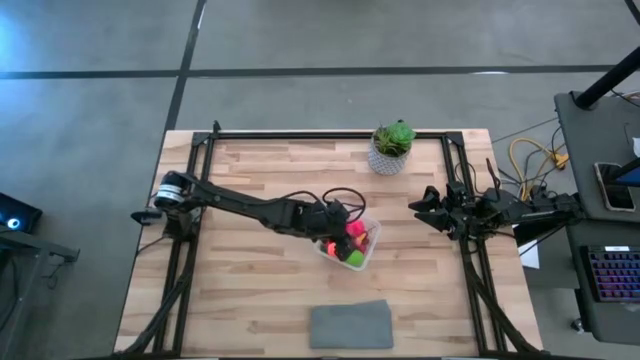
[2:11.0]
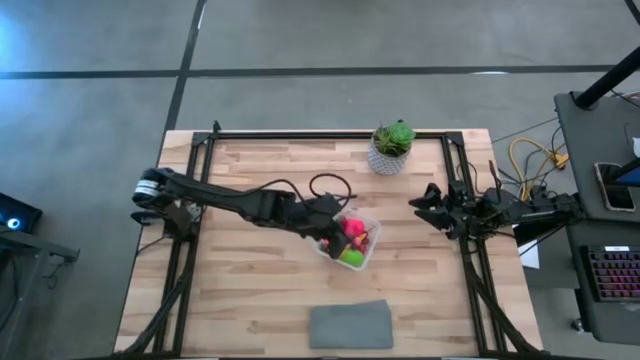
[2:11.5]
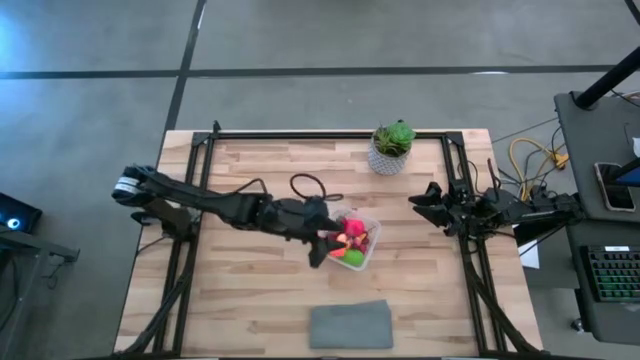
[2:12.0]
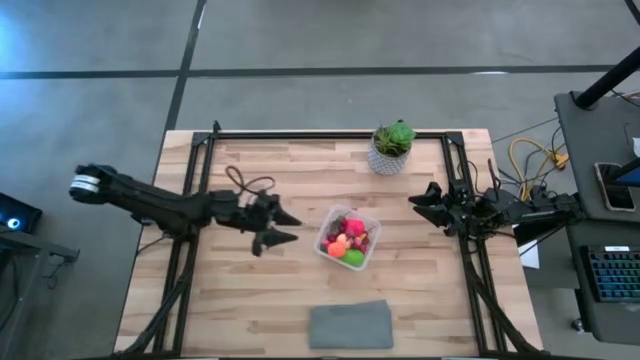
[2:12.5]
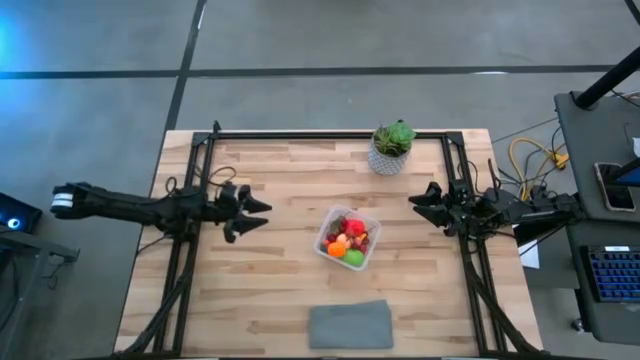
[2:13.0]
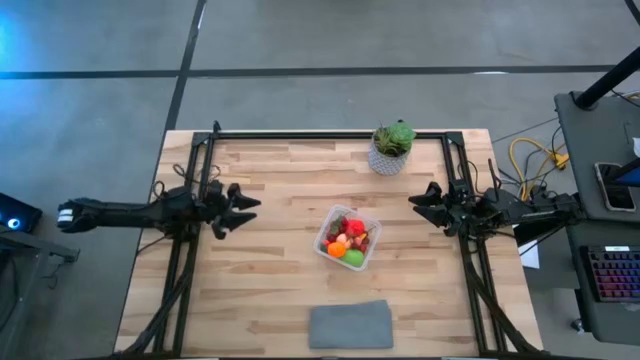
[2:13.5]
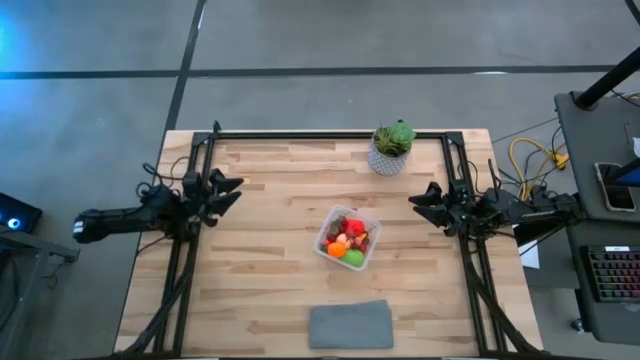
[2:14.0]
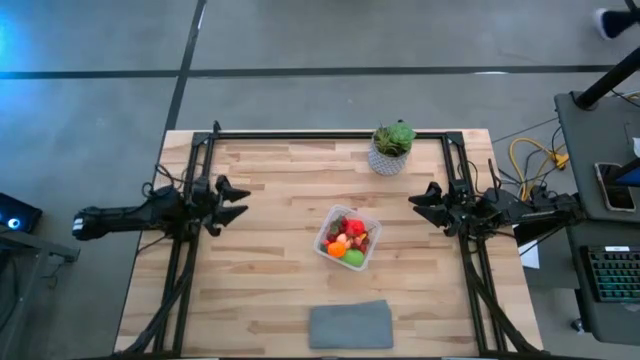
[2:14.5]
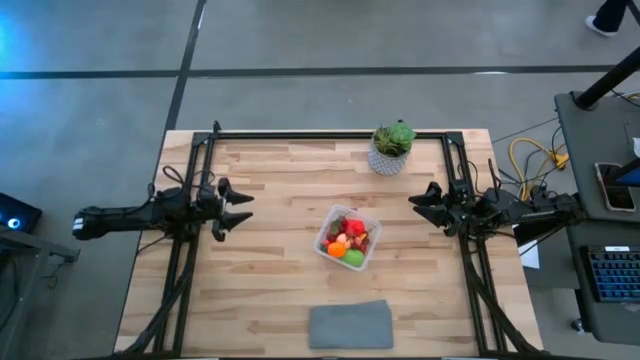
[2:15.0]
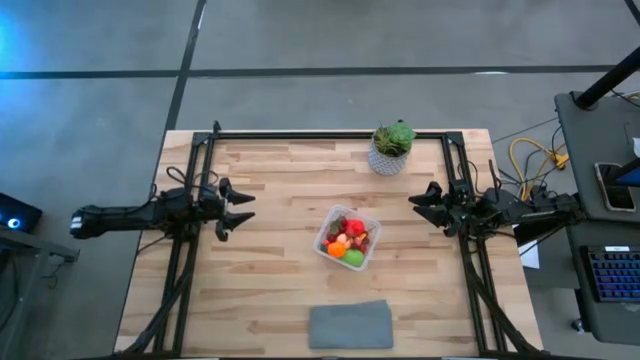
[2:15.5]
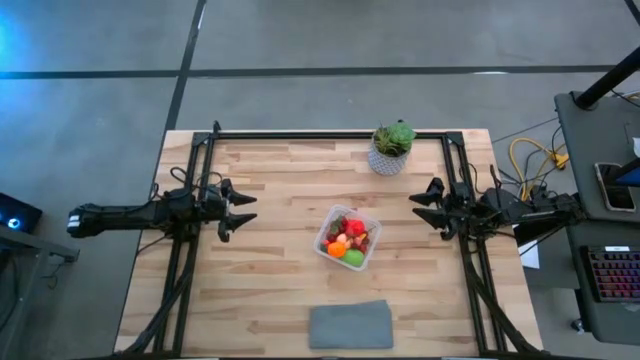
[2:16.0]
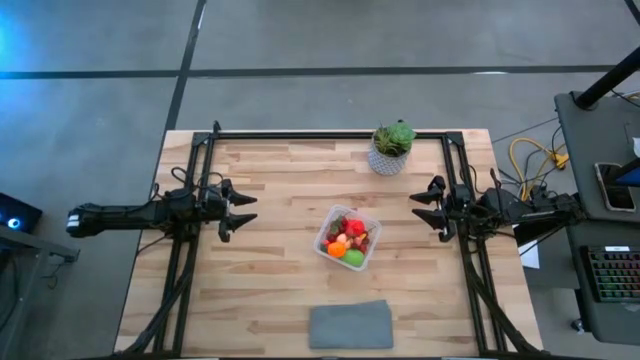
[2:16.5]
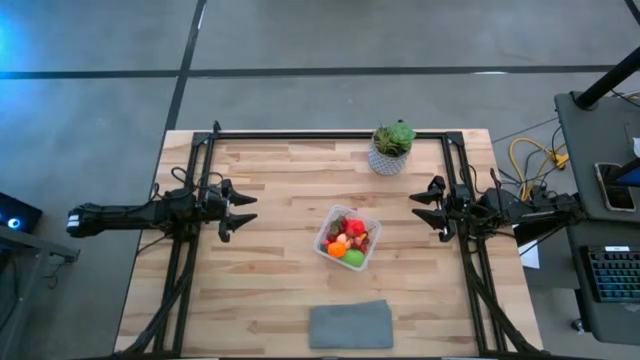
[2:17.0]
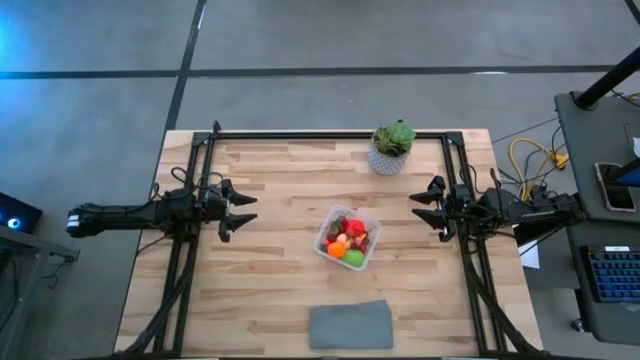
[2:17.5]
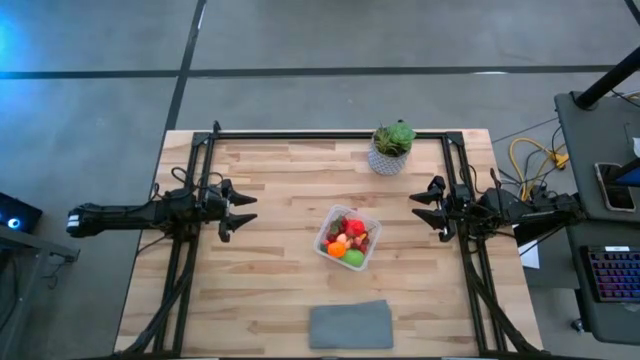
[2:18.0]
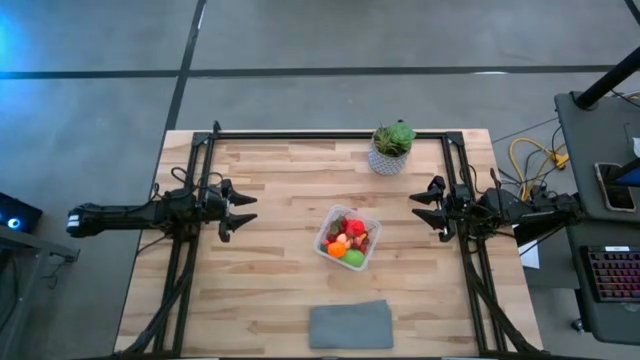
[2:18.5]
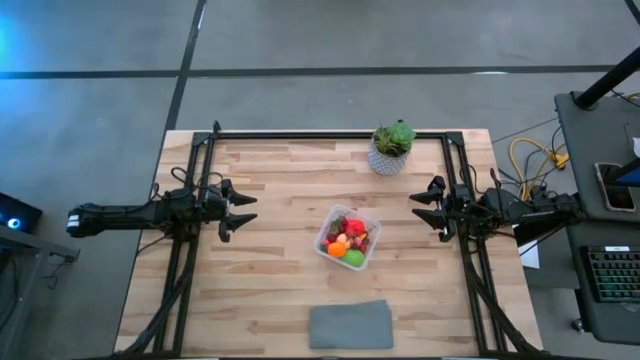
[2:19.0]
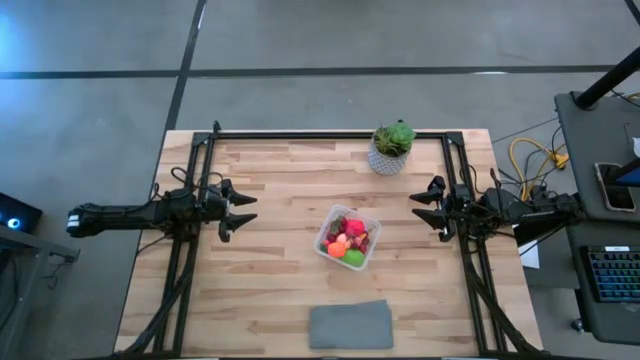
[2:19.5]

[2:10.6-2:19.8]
Task: Pick and placing Produce into tupperware
Return to Home Position

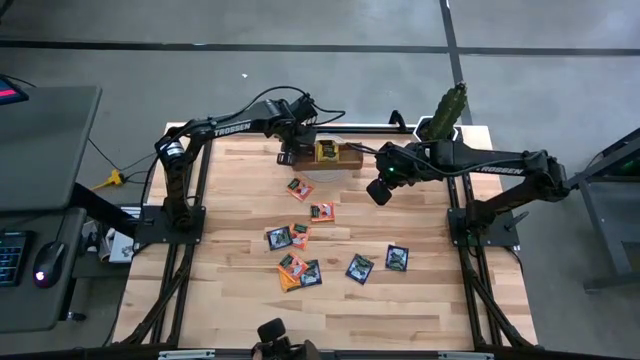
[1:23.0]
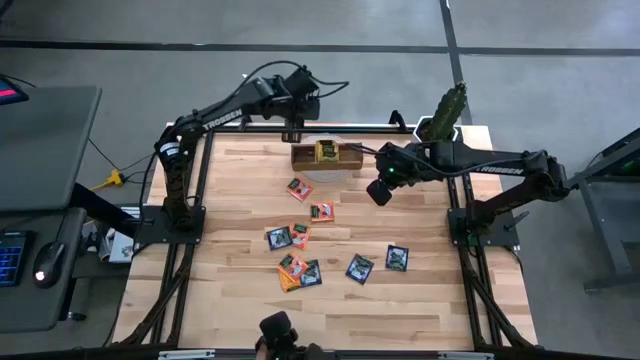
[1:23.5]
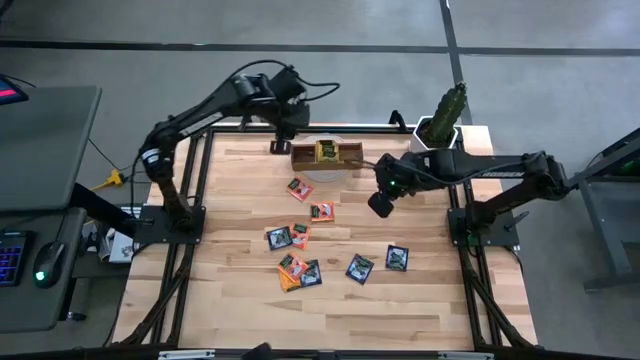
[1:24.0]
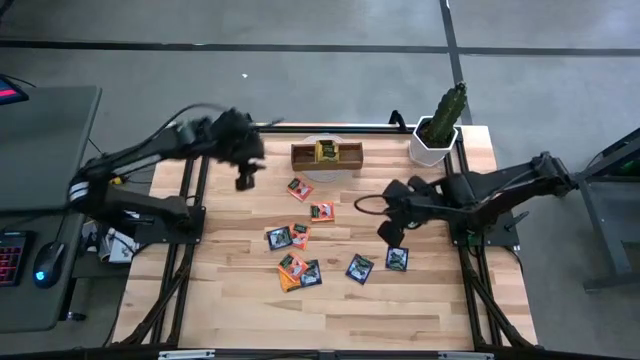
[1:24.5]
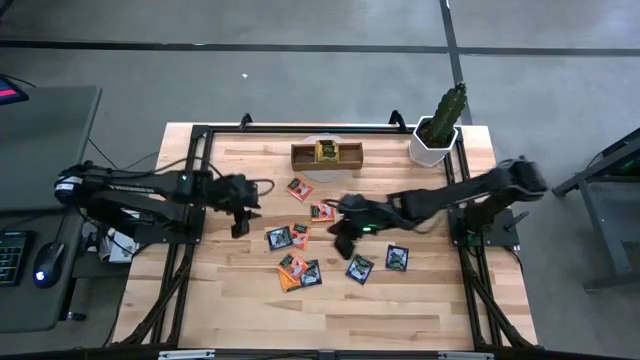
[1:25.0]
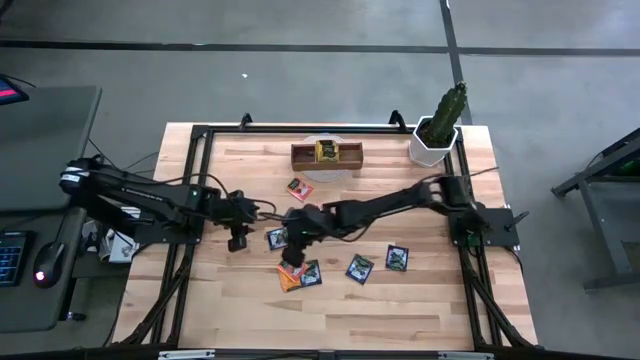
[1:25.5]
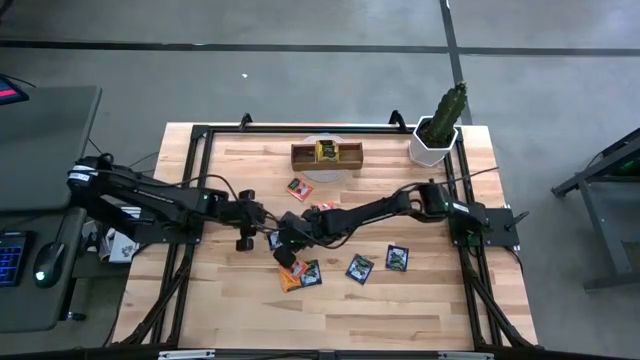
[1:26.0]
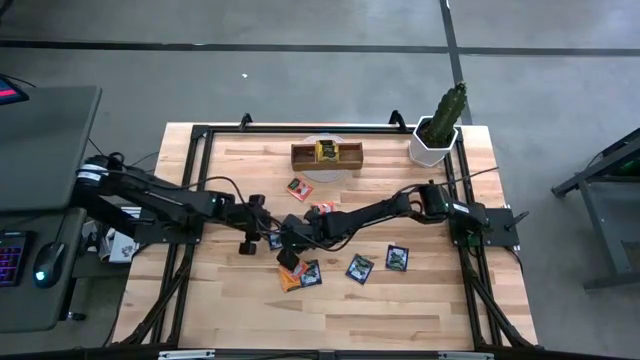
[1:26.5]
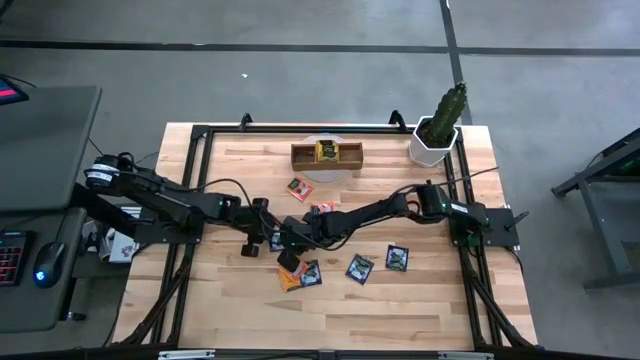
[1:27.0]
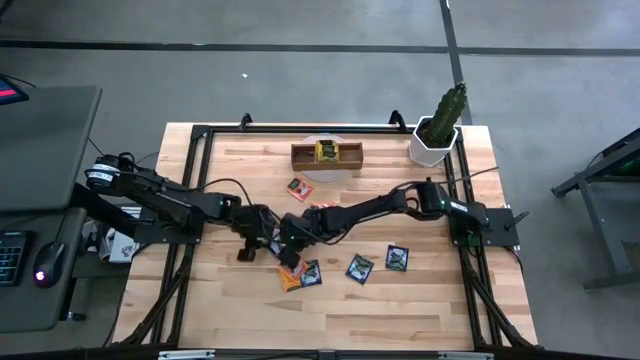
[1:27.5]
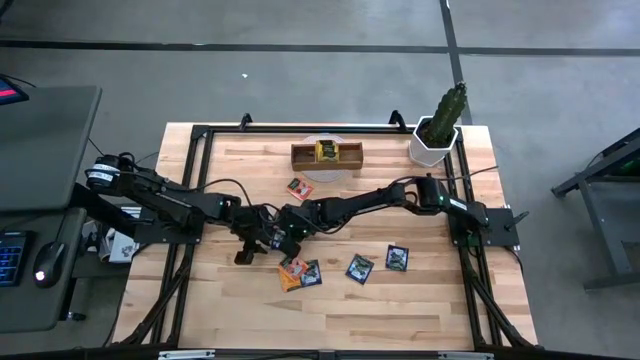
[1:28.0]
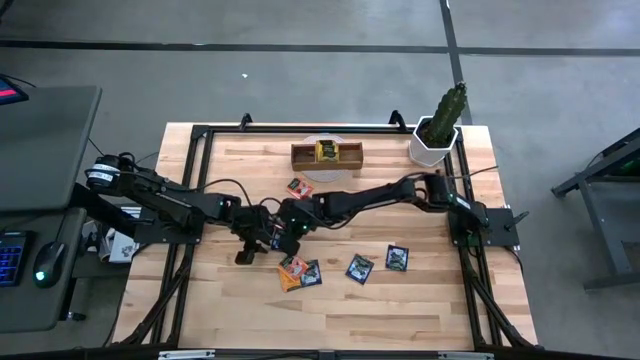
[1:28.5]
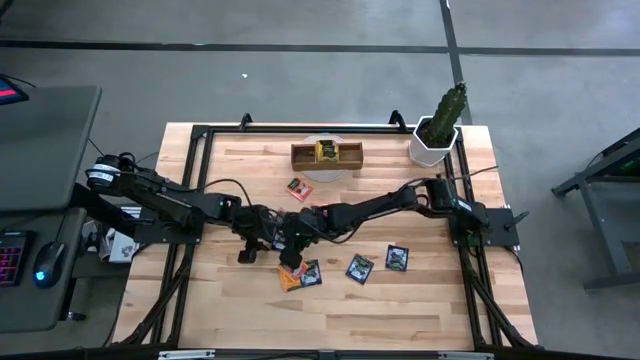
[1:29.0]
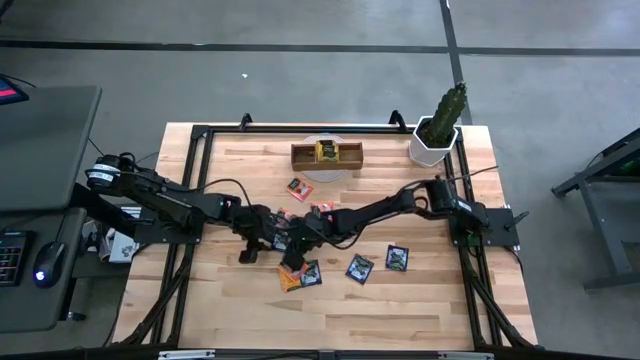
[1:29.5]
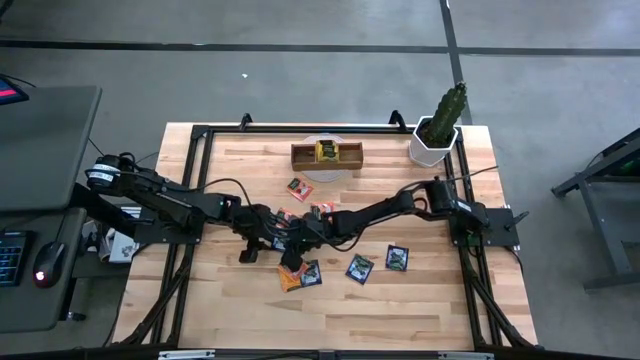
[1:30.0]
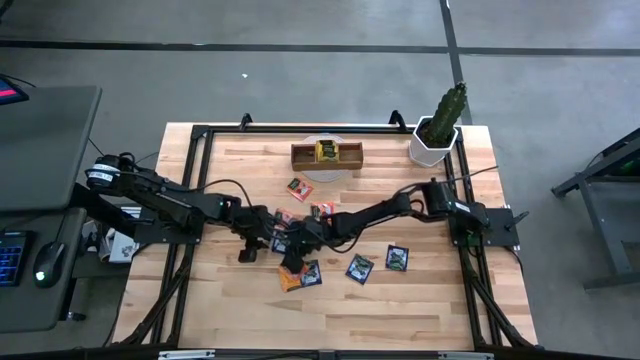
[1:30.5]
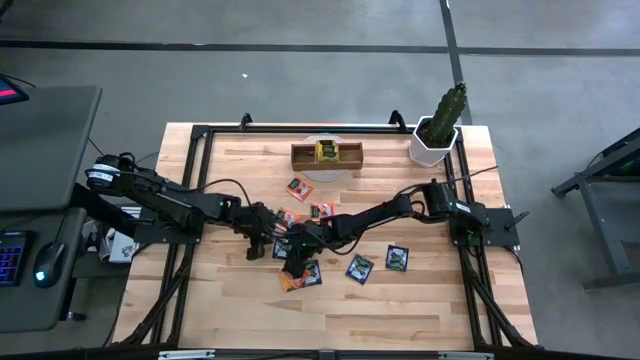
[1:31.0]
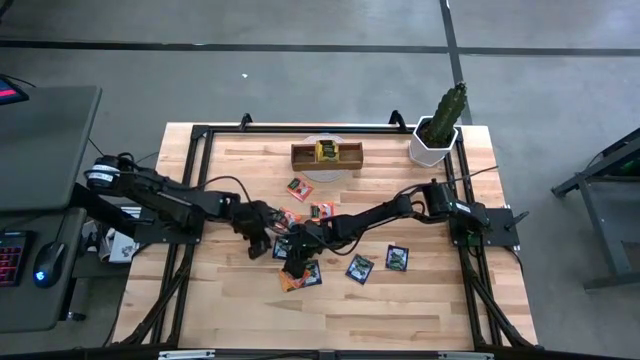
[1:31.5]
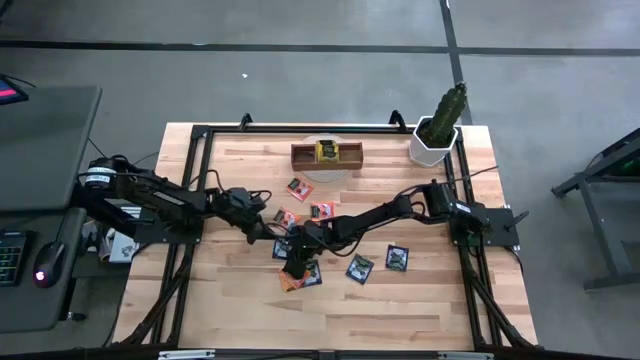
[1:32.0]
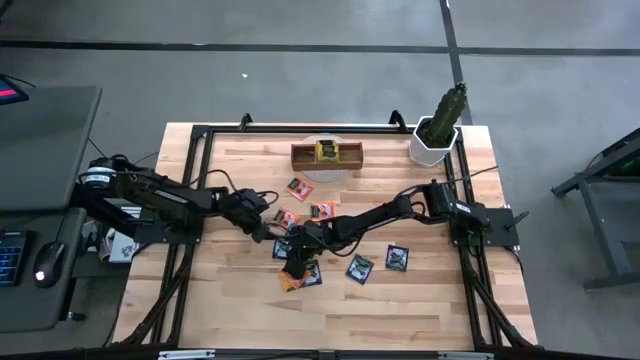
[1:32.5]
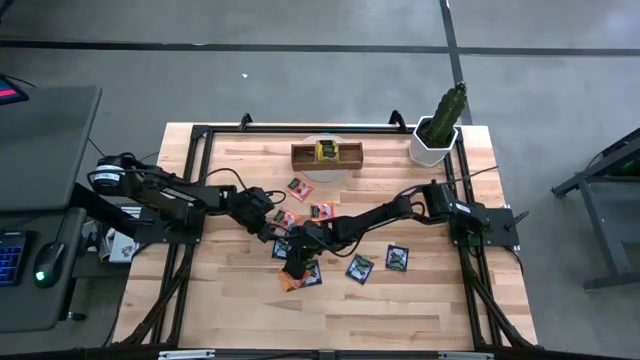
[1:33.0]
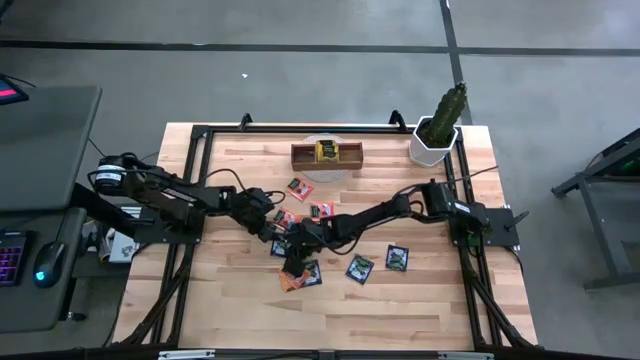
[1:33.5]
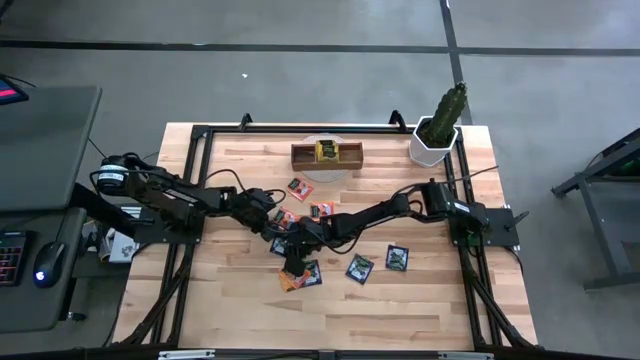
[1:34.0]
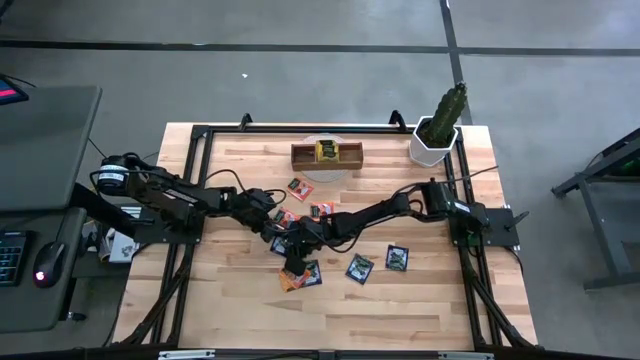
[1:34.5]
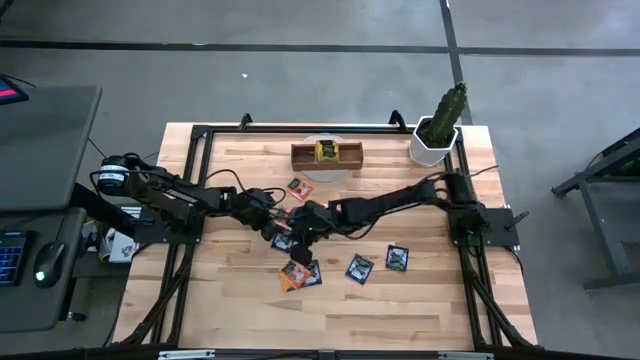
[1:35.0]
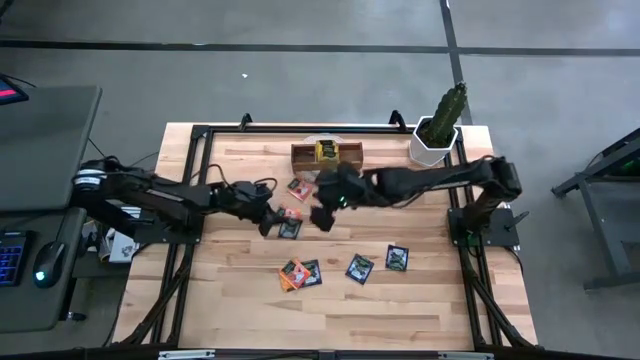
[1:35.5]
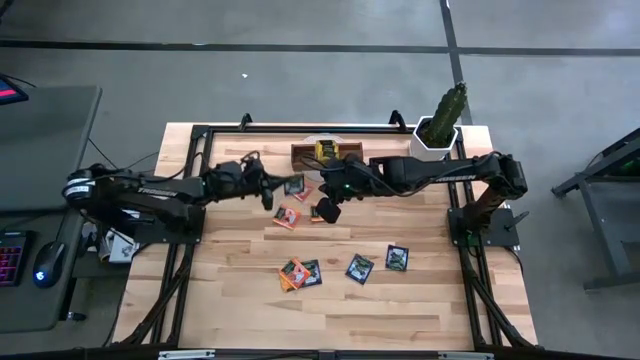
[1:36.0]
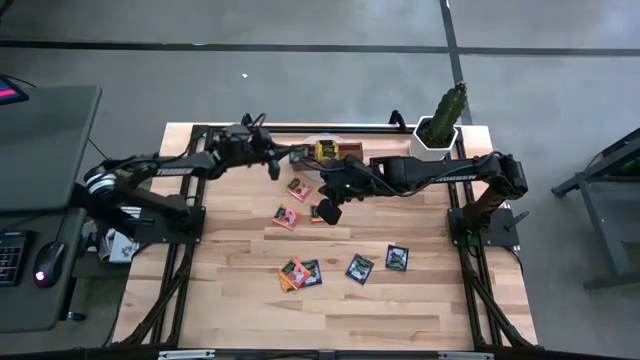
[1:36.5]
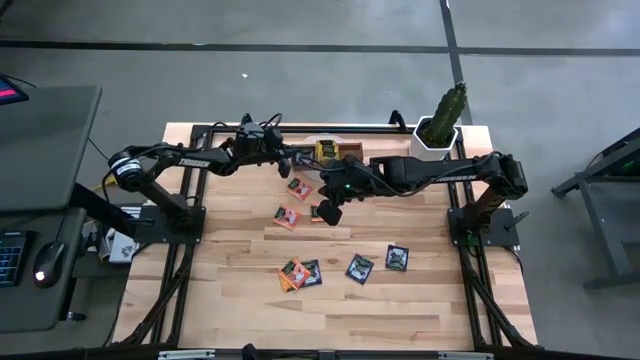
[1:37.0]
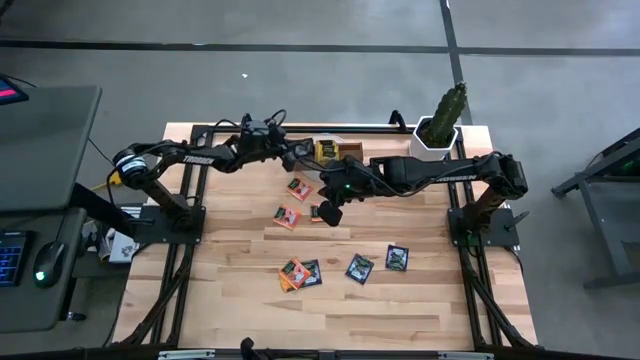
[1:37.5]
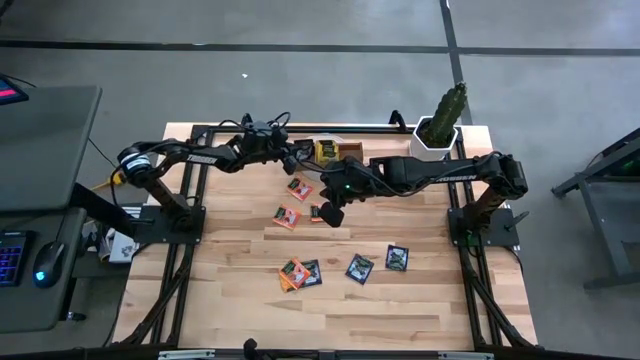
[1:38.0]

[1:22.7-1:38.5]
Task: Pick & Place Tea
Put the purple tea bag in the left compartment of the organizer
